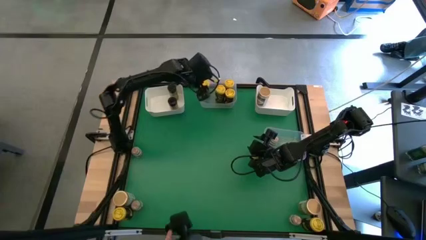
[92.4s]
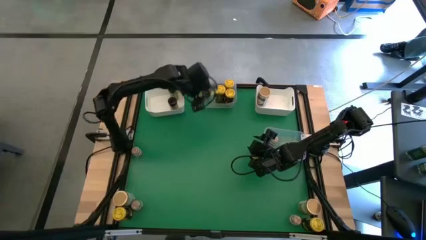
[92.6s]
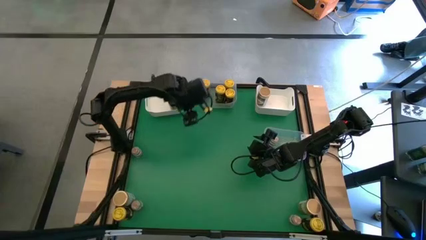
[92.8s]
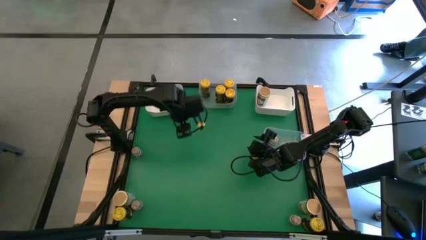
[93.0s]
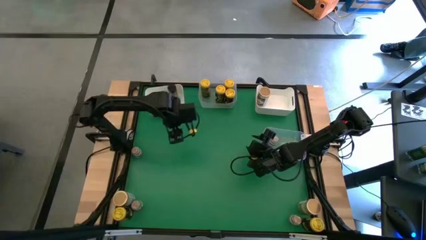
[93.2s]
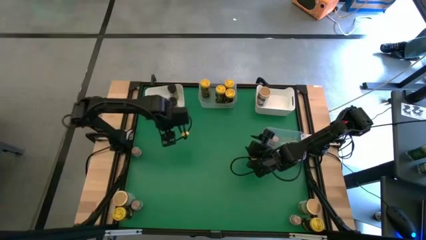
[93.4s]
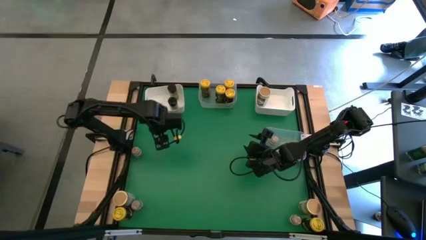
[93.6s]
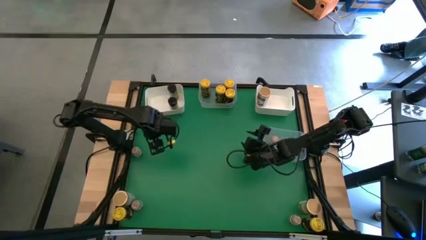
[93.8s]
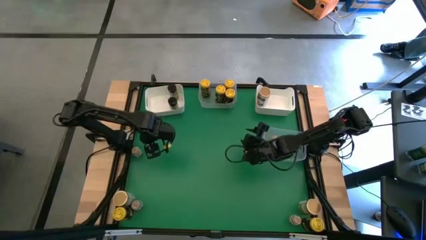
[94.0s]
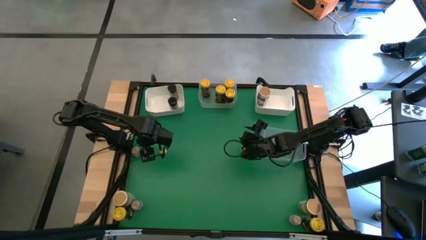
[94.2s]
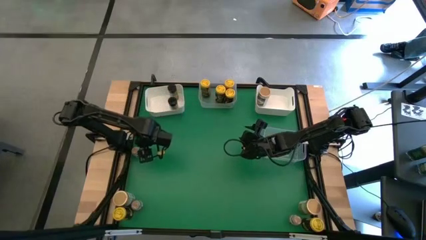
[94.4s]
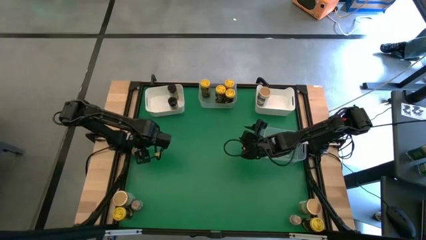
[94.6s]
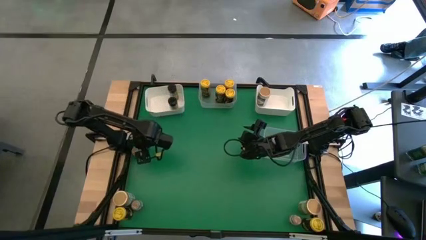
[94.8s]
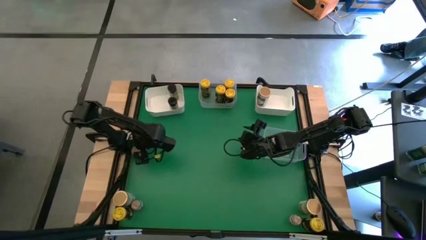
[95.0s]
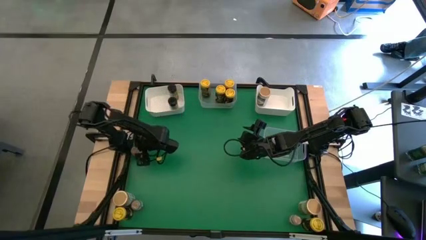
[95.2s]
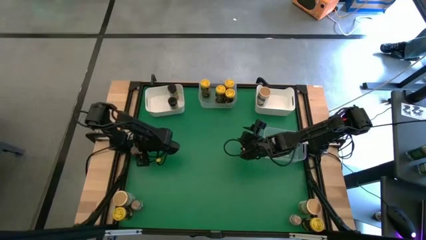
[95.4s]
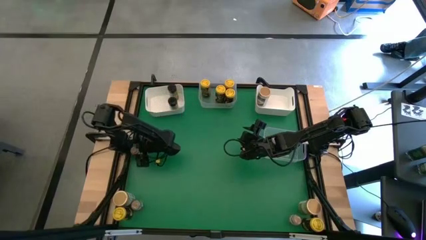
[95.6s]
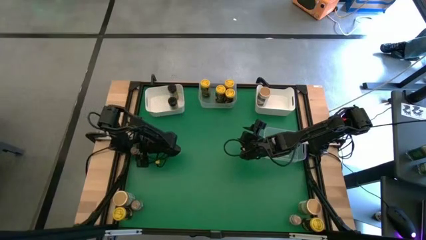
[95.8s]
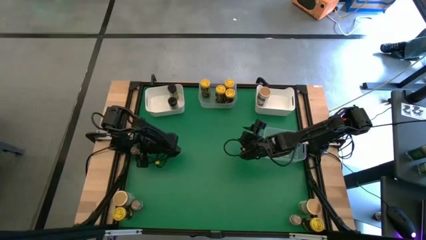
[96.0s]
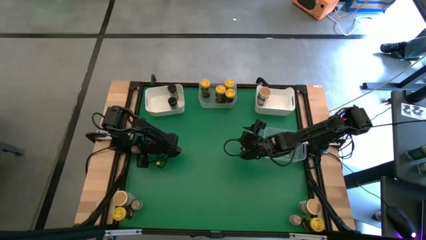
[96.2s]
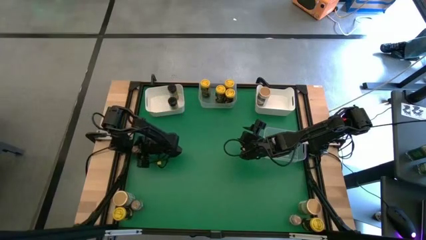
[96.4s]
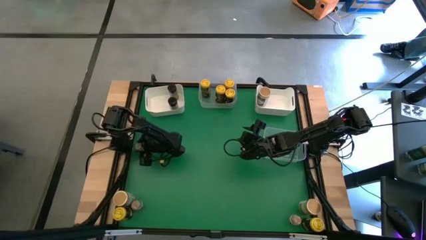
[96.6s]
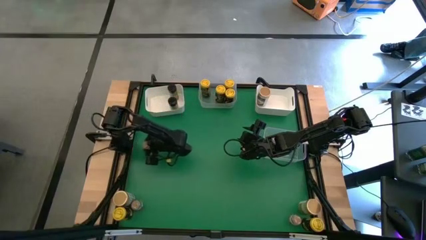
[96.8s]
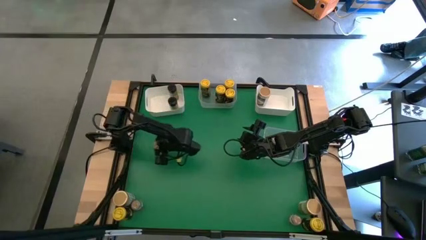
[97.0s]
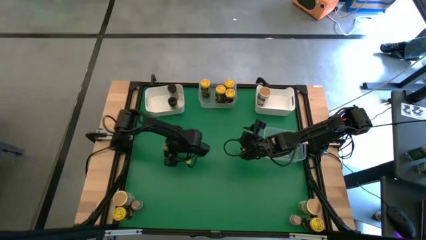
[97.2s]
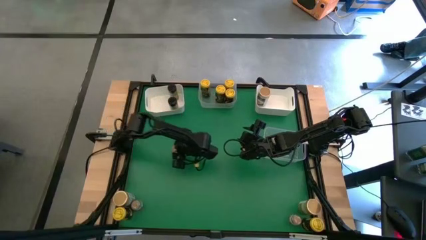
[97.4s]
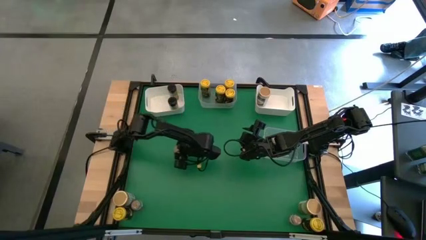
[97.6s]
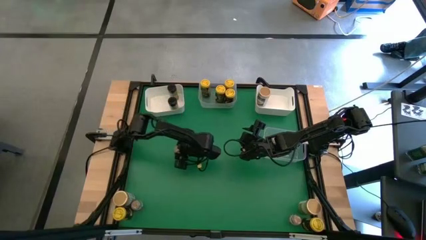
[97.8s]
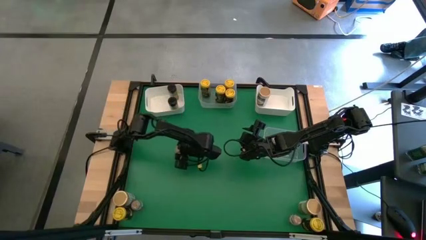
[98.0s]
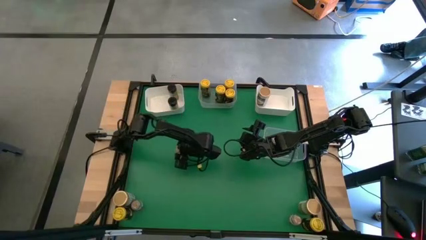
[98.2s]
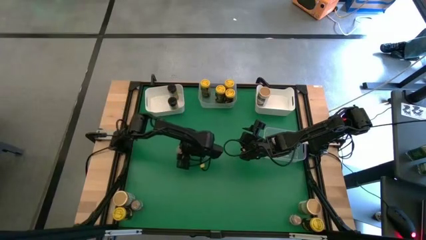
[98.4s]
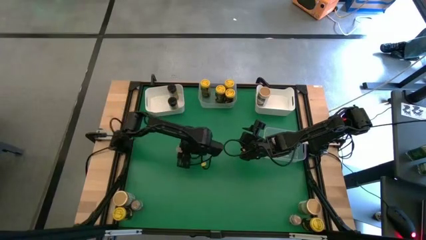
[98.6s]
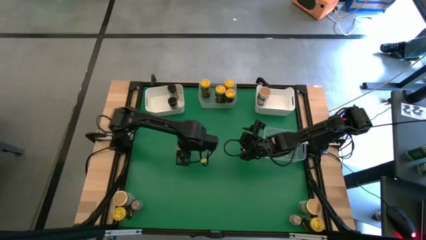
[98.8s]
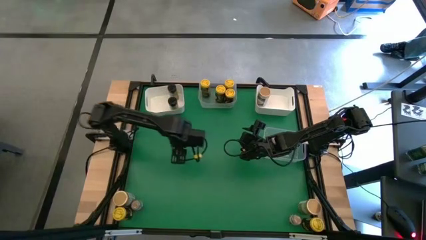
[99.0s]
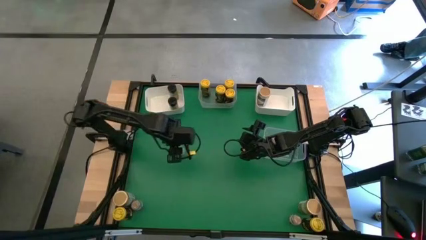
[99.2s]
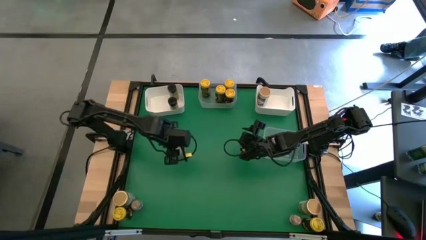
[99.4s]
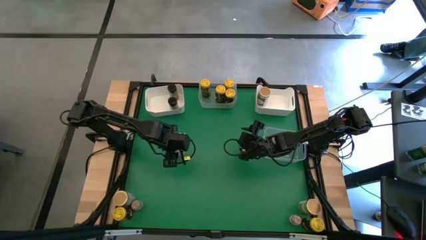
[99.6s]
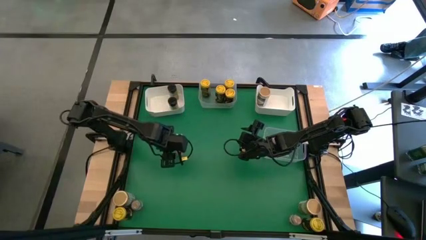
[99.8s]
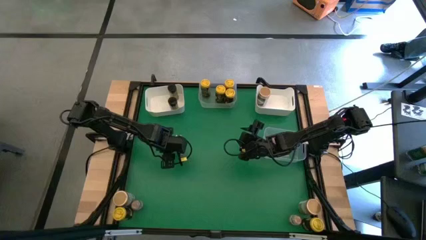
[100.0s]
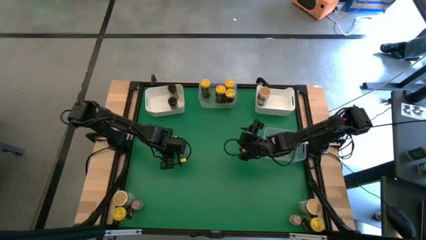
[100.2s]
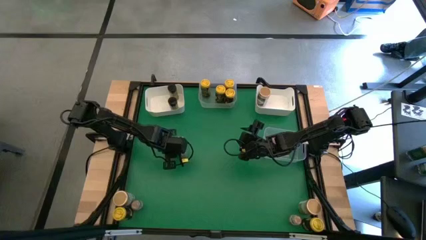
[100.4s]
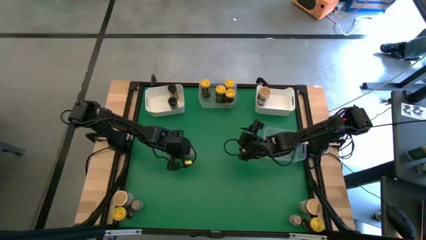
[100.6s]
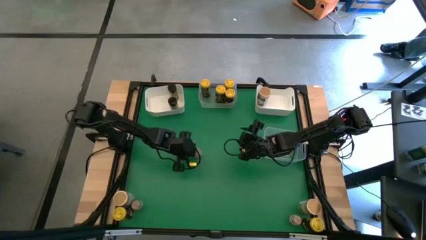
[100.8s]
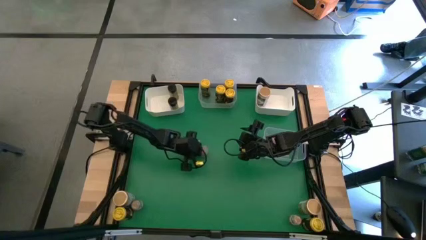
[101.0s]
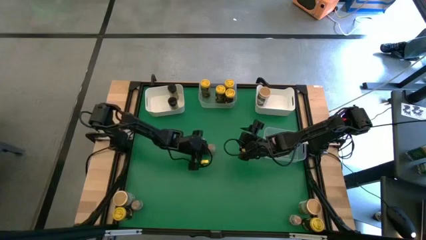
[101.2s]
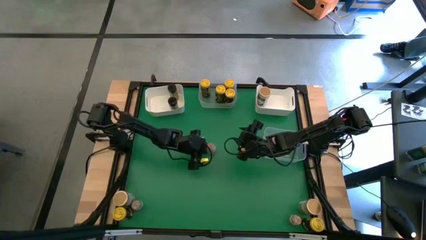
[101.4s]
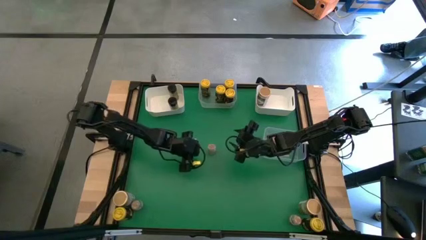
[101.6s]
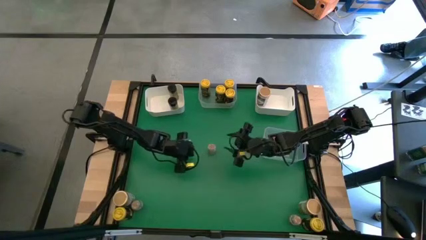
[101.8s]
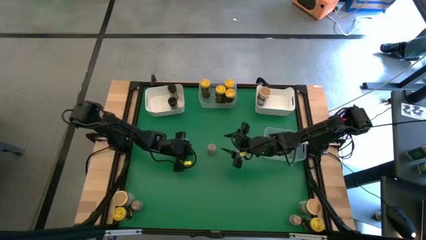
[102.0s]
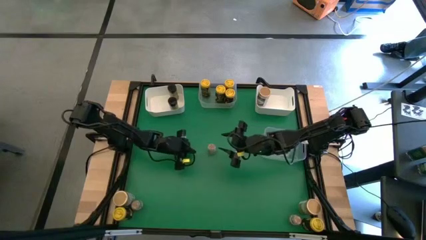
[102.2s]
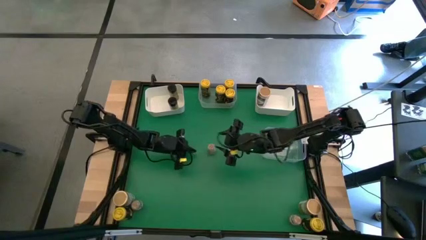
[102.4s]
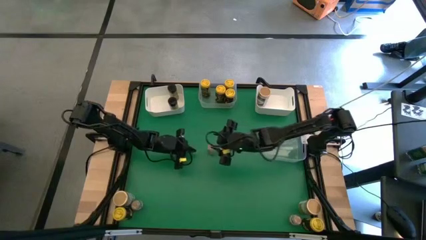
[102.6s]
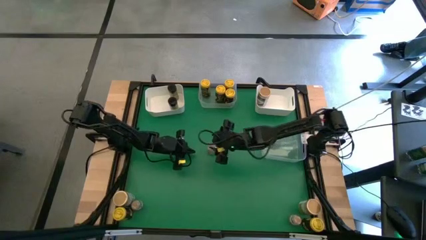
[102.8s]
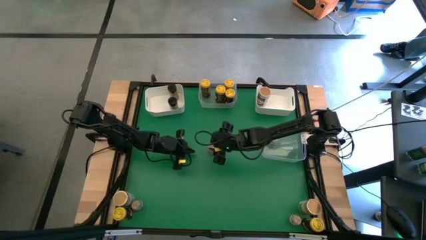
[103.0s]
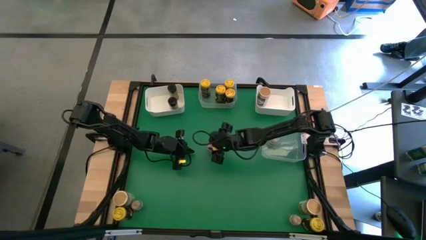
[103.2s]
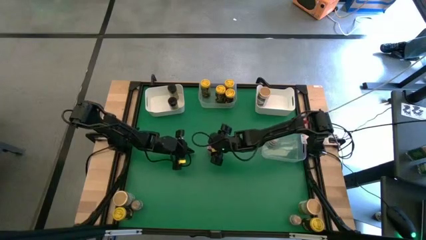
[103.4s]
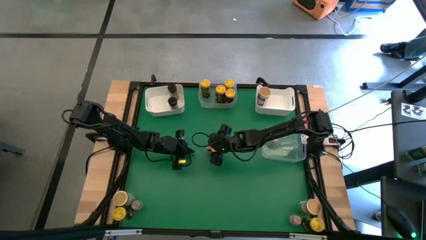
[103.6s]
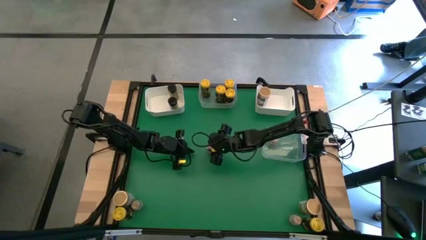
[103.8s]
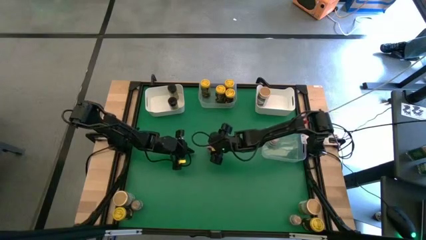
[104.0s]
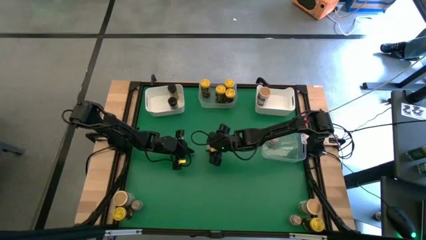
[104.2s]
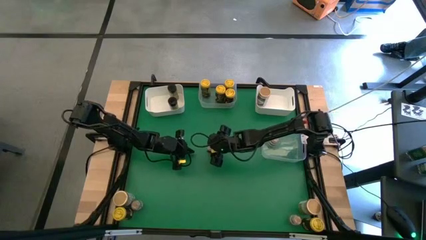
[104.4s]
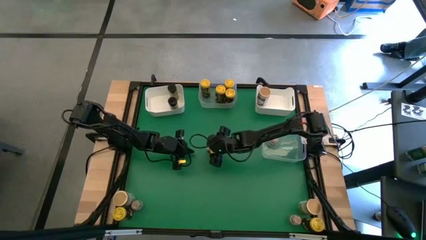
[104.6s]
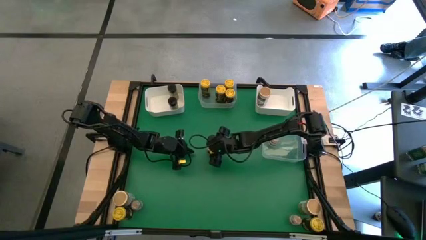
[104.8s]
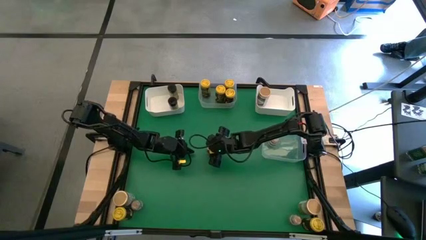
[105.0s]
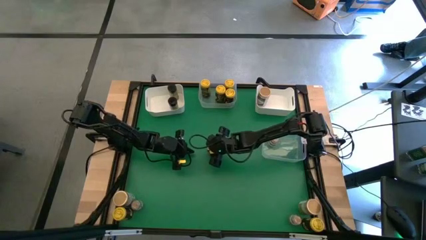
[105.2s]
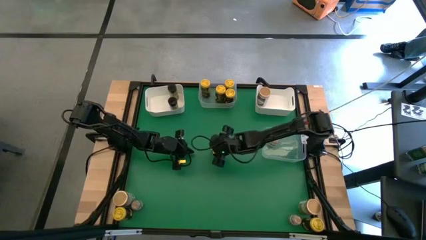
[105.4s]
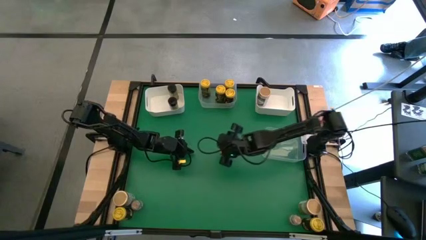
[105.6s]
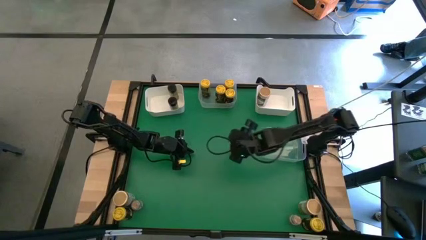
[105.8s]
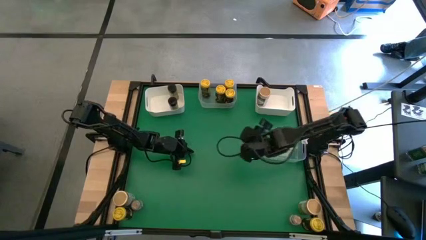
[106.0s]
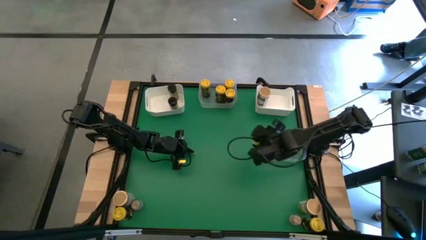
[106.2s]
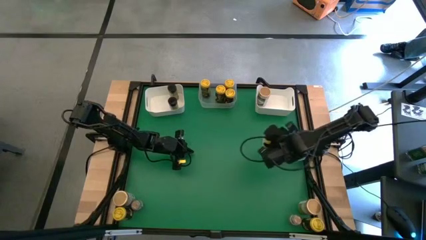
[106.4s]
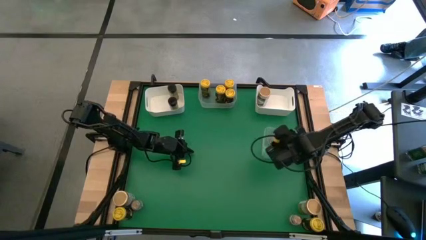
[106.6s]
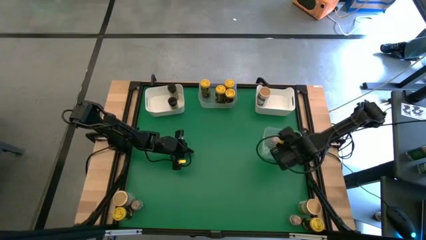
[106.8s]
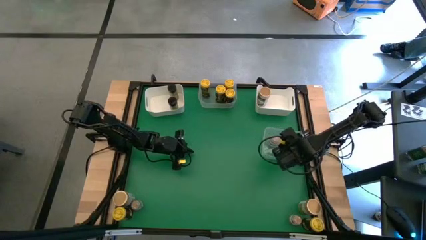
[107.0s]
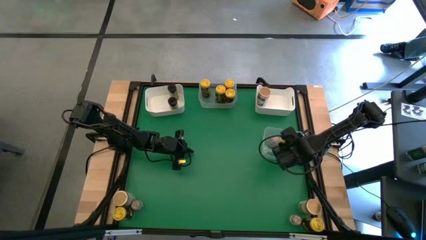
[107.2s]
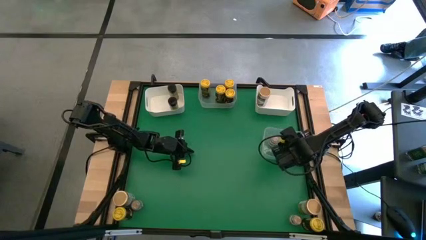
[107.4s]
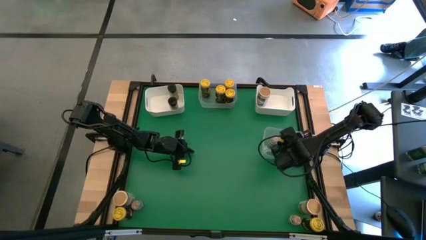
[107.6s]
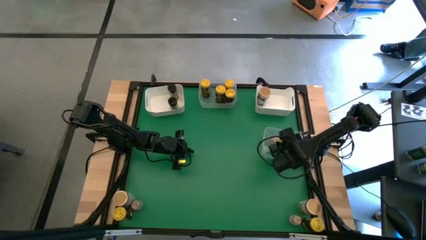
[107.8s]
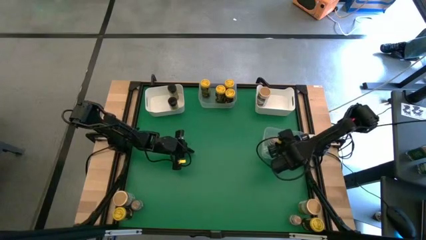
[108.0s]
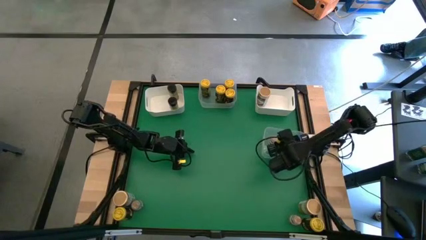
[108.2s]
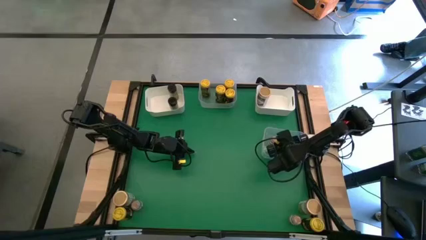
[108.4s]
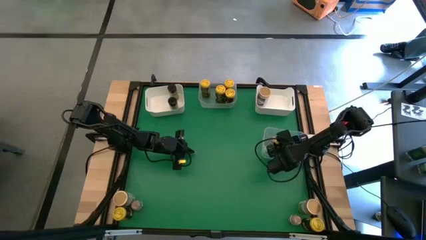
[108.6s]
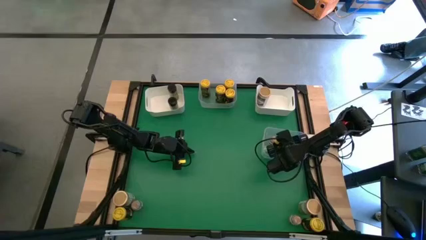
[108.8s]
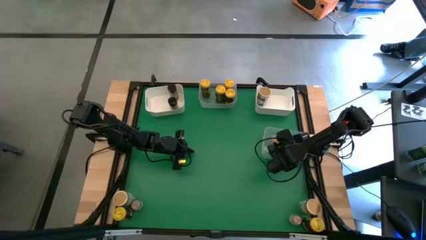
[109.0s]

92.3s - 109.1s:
Task: Sort spices by type
Put the transparent seasoning bottle into the bottom transparent bin
